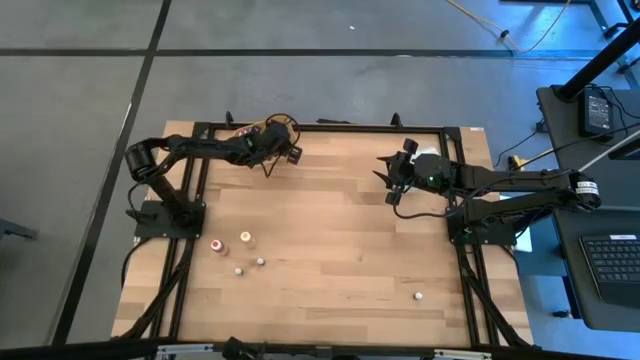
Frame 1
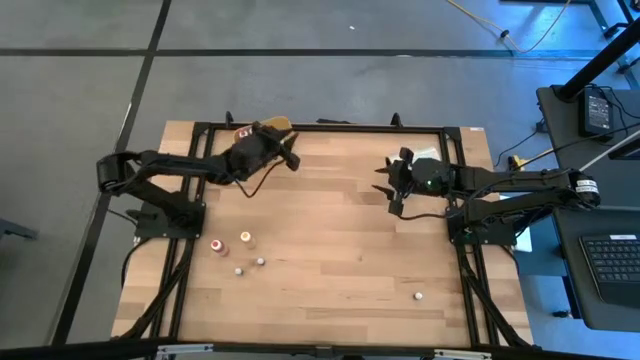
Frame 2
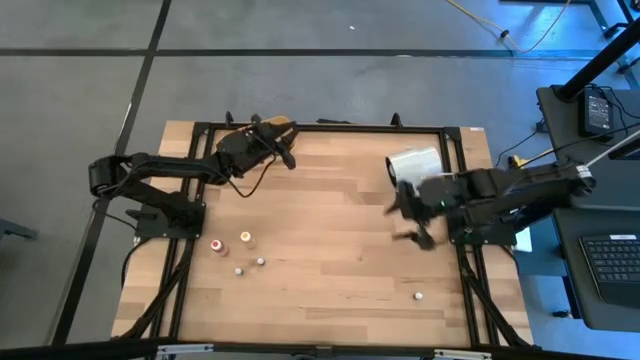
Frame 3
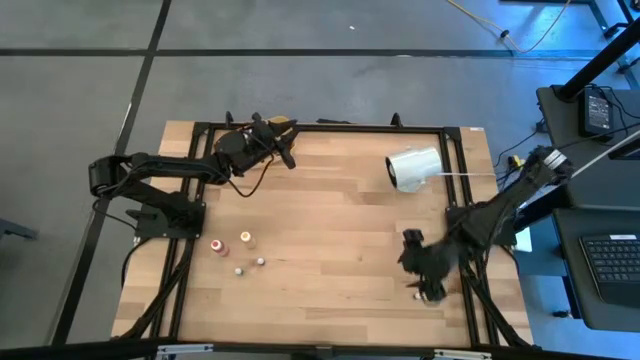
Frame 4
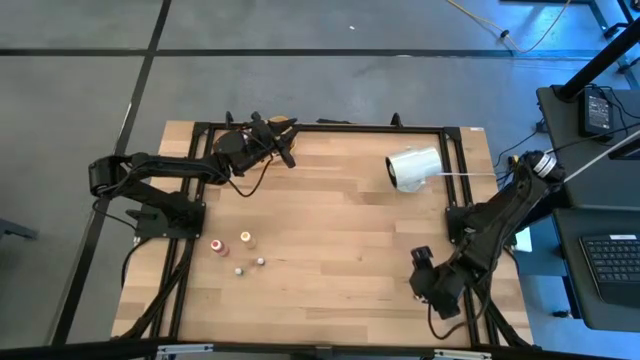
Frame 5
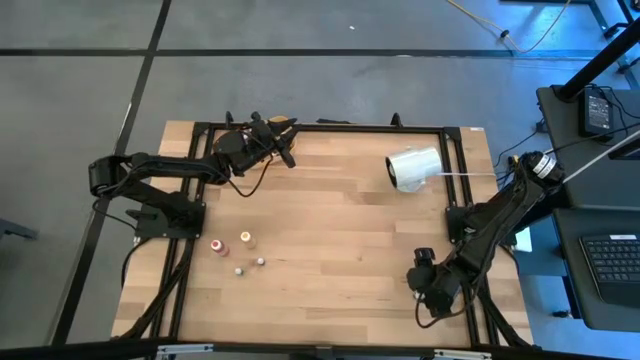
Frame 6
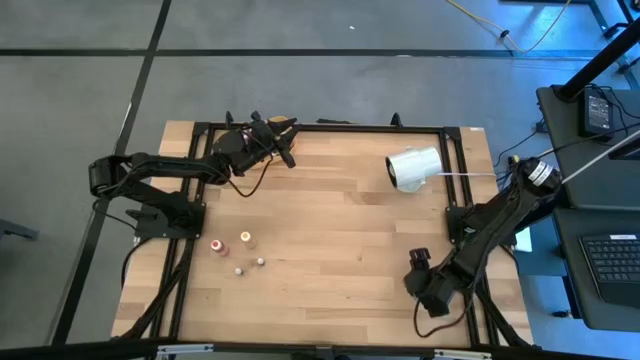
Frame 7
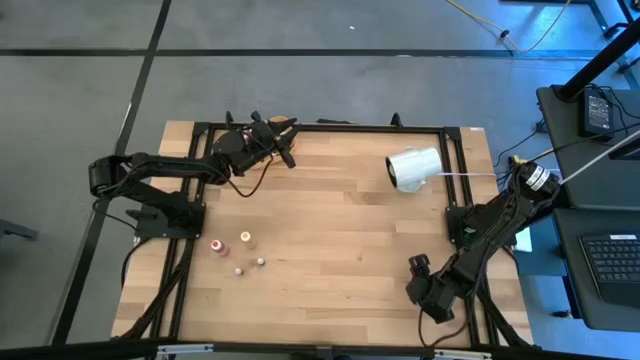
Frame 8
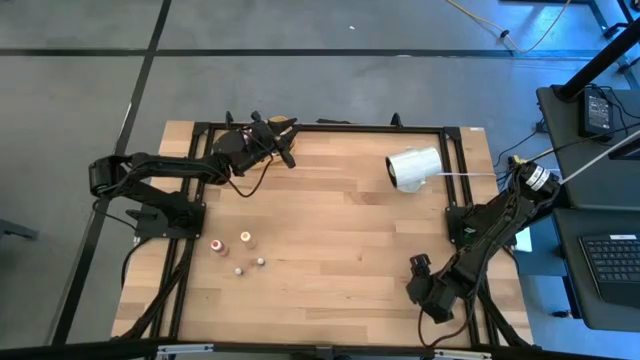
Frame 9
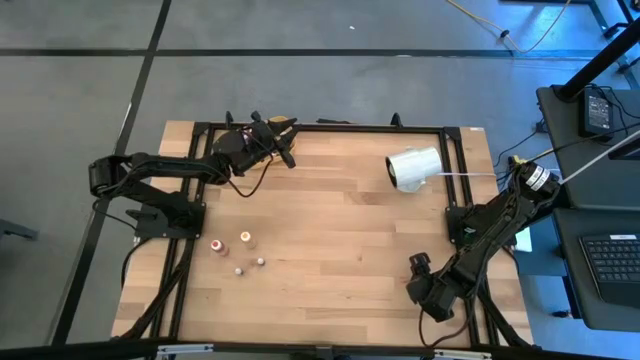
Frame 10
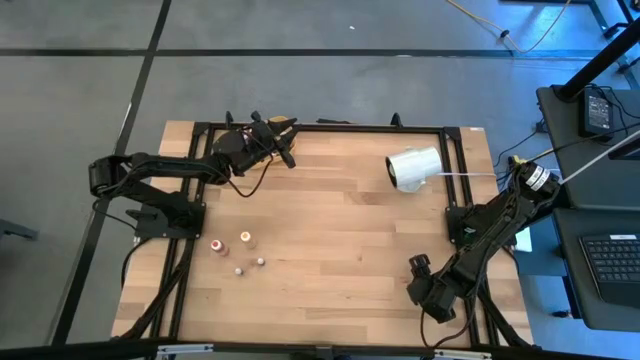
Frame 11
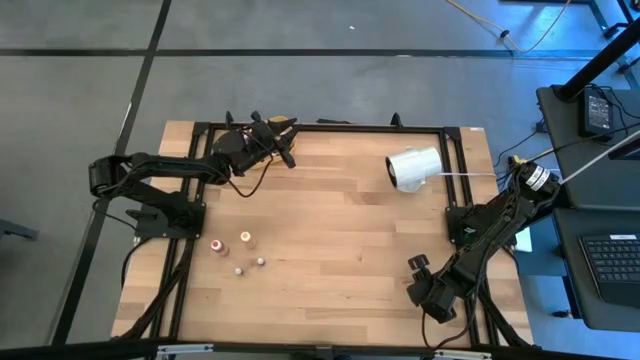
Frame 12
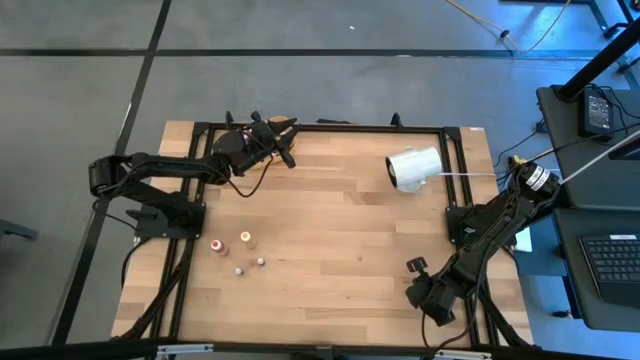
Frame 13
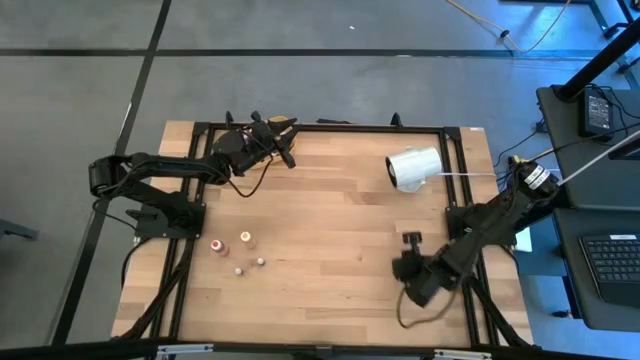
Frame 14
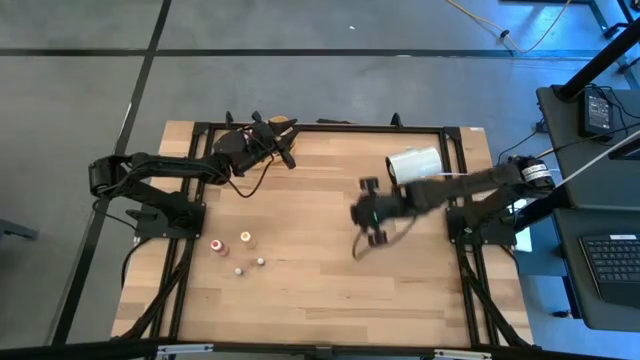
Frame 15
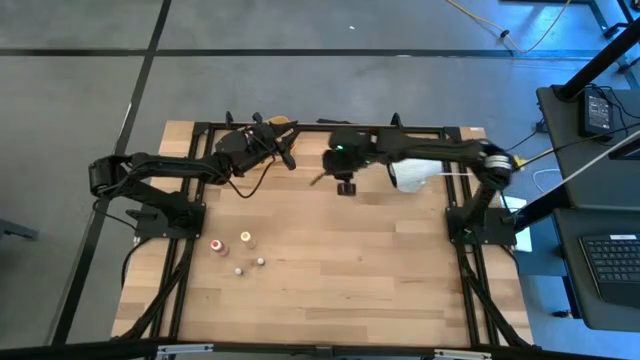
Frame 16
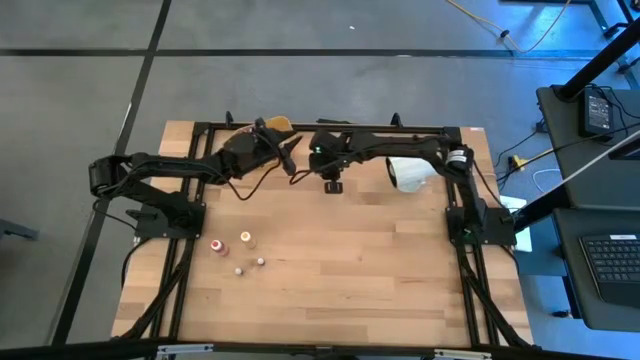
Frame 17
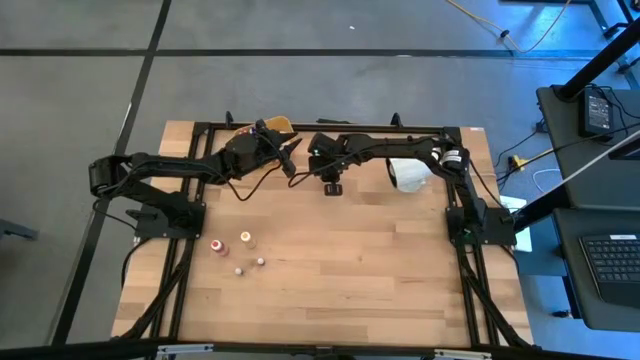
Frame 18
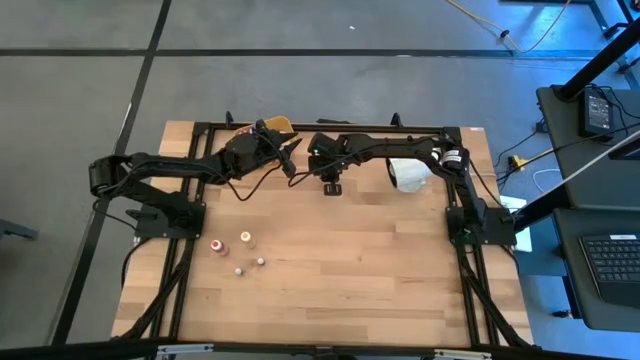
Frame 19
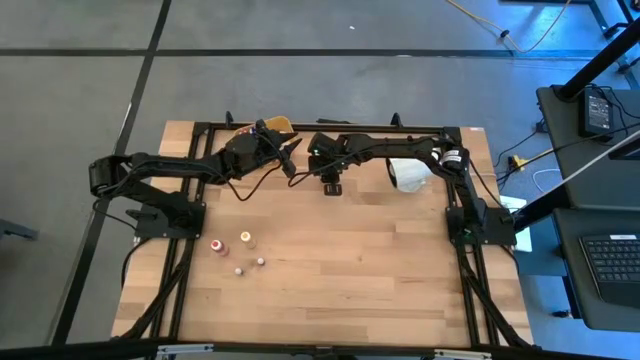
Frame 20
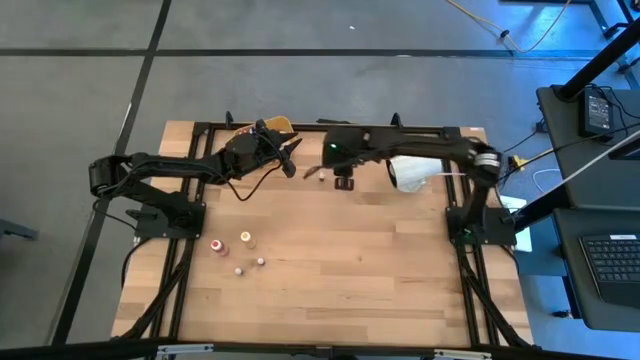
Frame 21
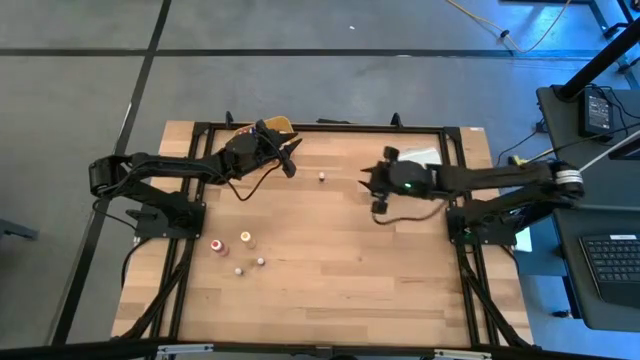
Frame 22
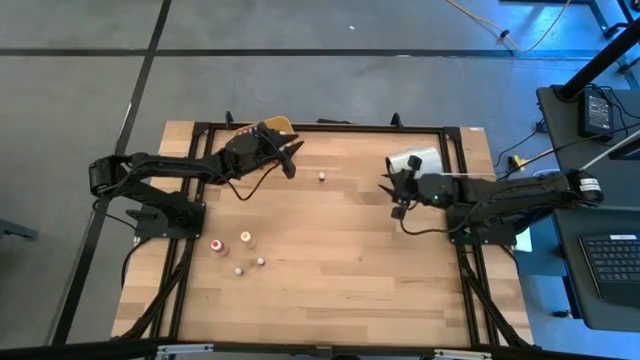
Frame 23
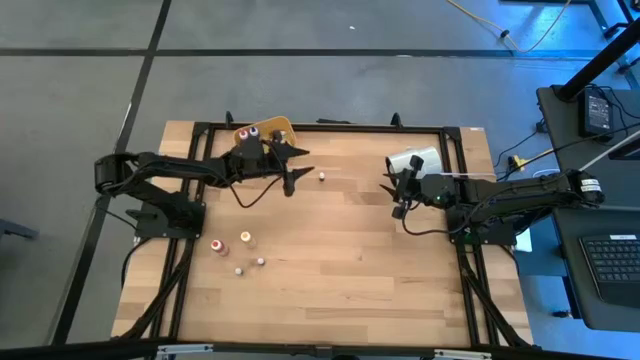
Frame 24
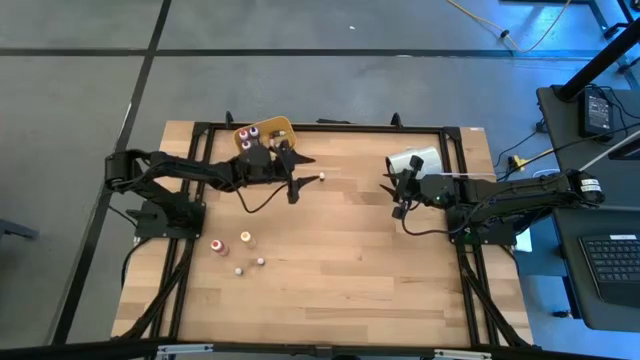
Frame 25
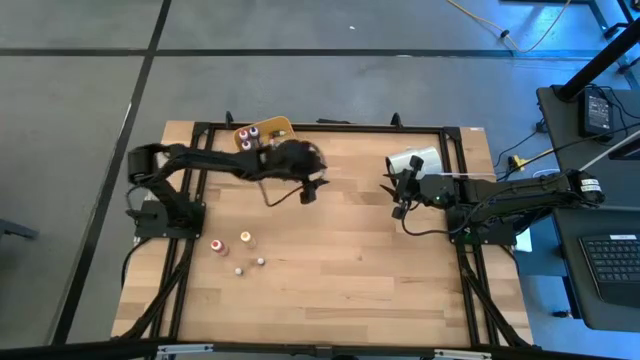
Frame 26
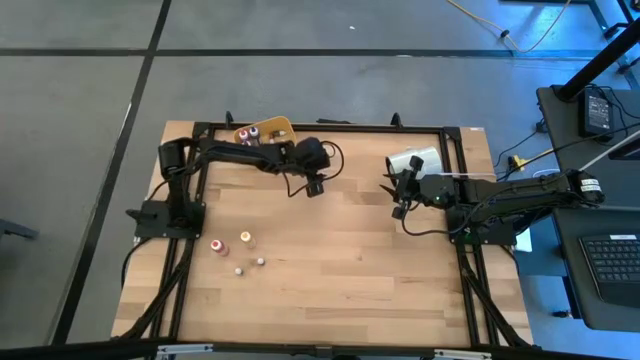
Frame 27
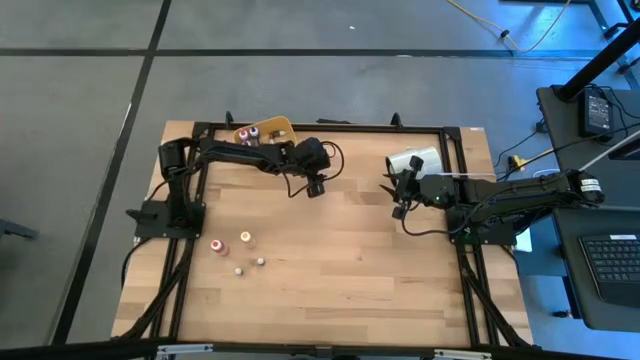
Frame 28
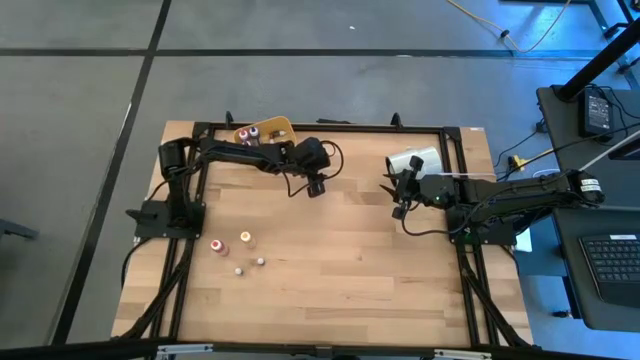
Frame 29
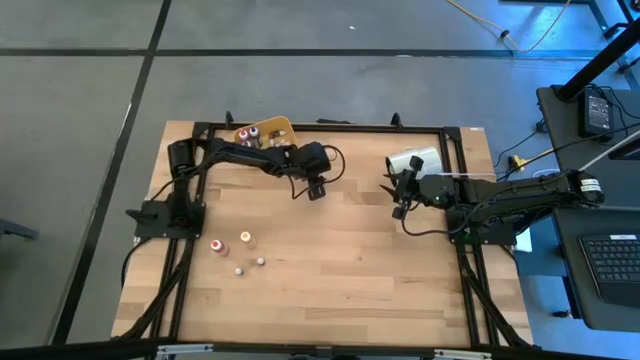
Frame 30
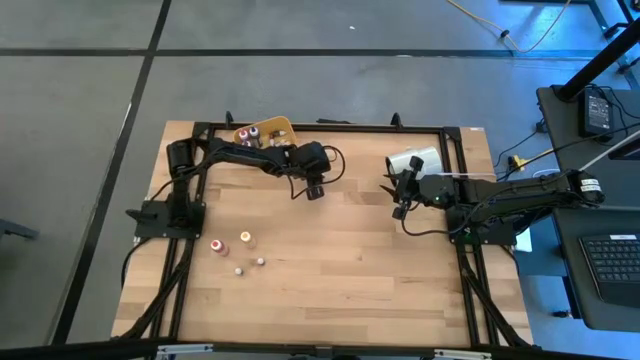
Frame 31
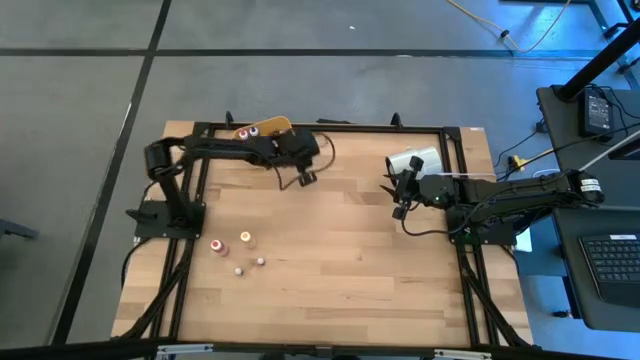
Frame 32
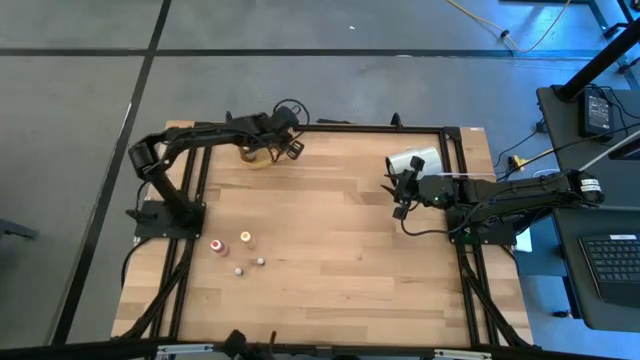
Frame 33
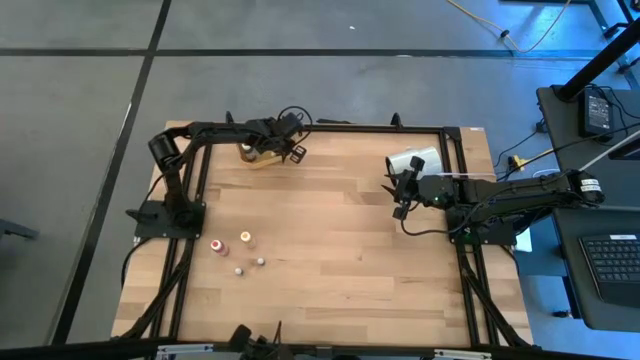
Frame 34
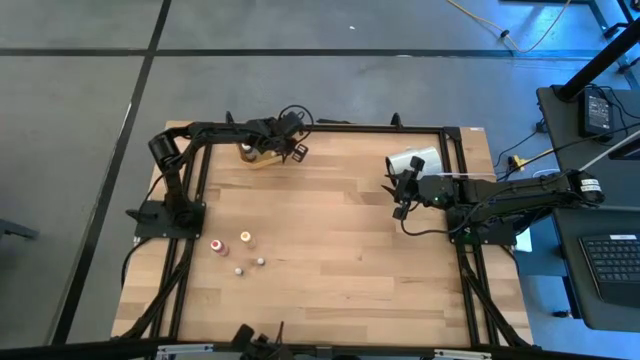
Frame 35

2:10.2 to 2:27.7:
Task: Pick & Place food coloring
Put the right small pink food coloring bottle into the yellow bin

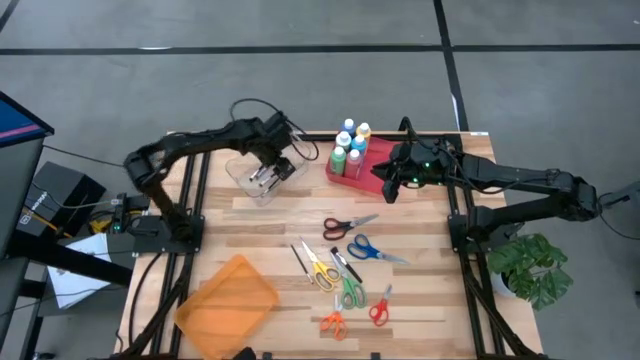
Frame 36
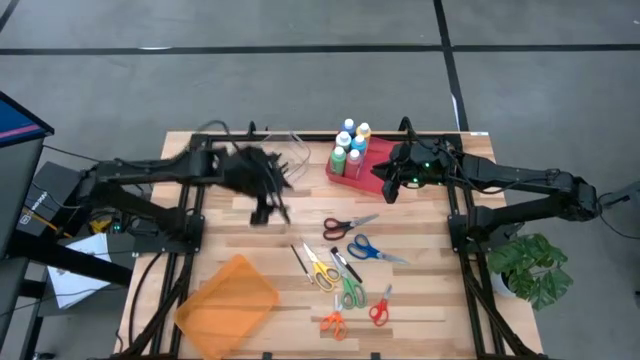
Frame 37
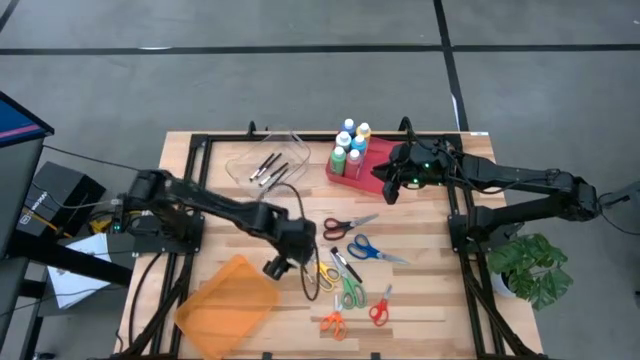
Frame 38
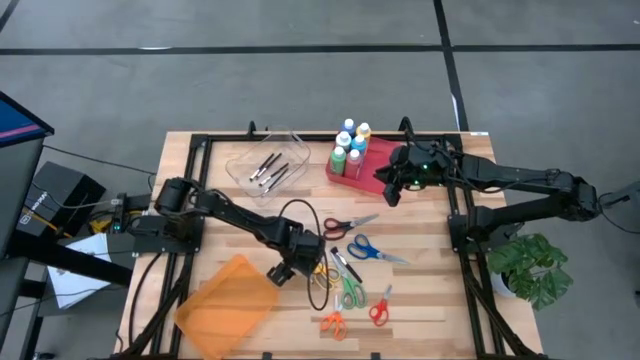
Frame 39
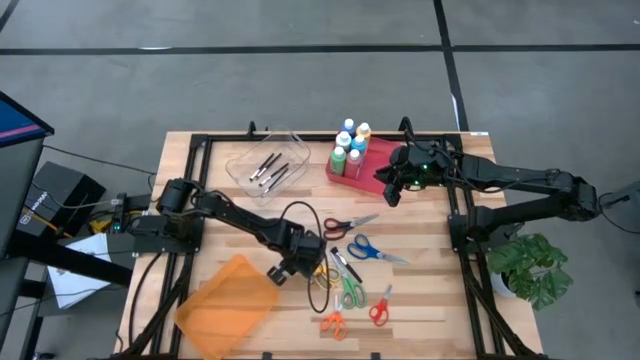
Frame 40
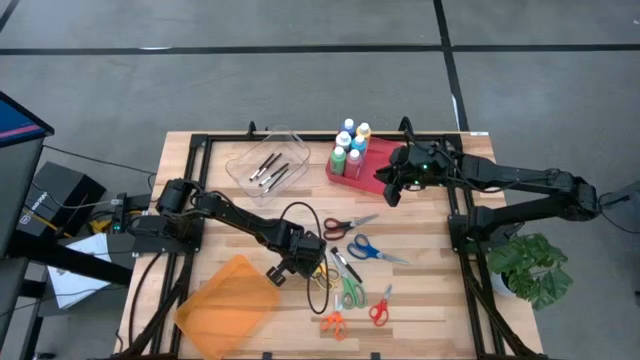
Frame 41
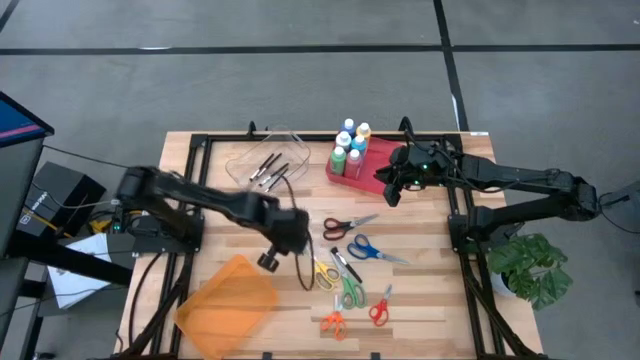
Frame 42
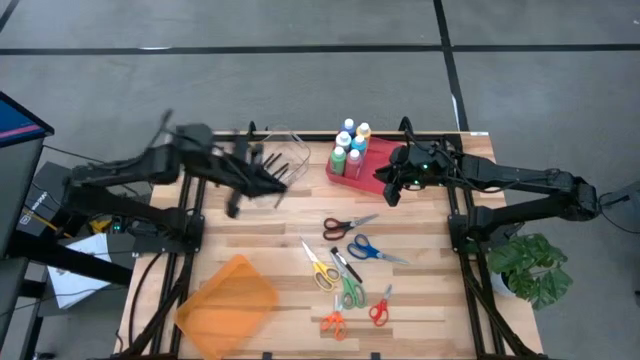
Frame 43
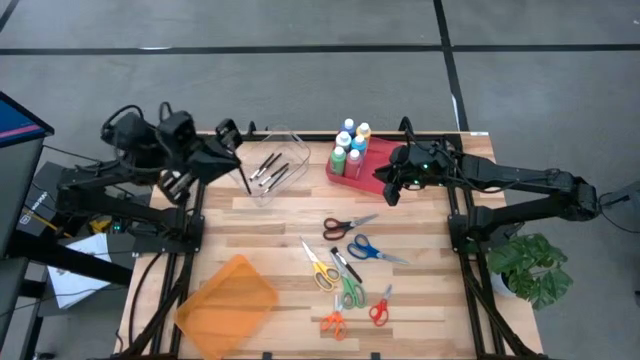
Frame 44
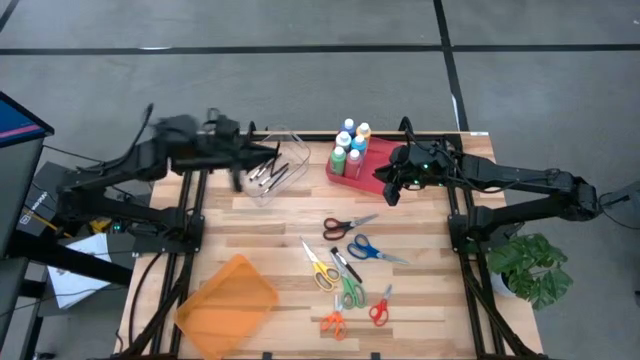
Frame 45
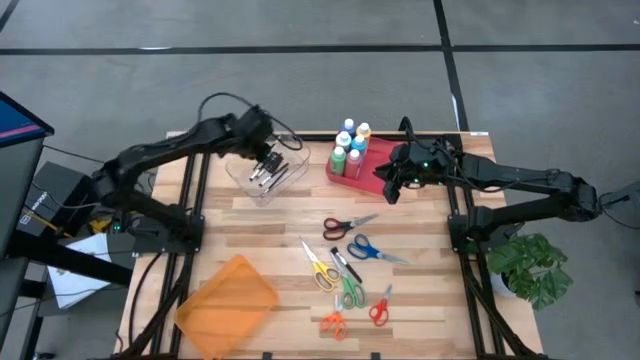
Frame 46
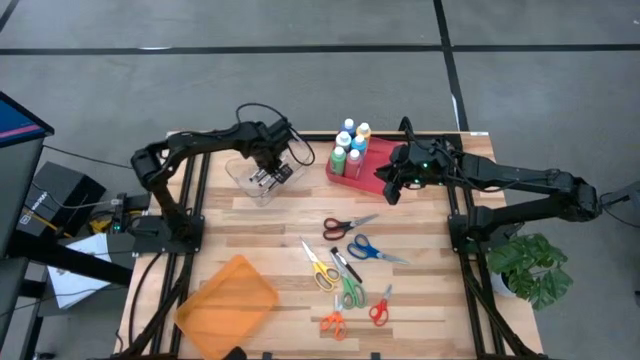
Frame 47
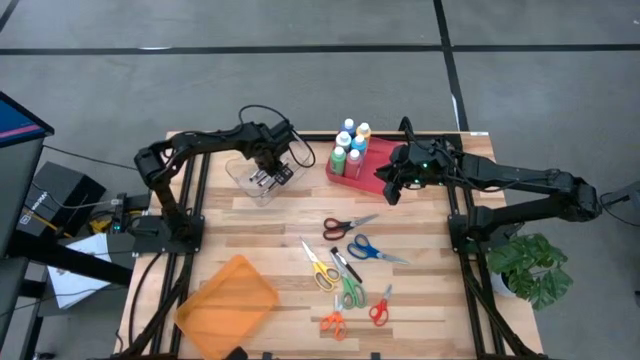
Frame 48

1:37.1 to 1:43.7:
Task: Pick & Place Paint Supplies
Put the black paint brush into the transparent bin
